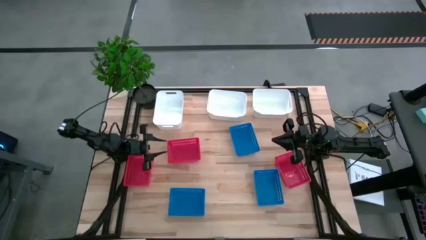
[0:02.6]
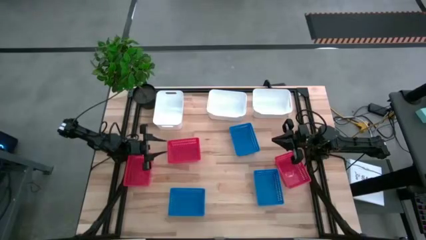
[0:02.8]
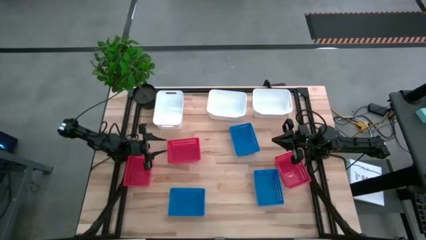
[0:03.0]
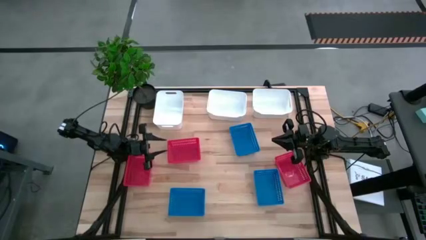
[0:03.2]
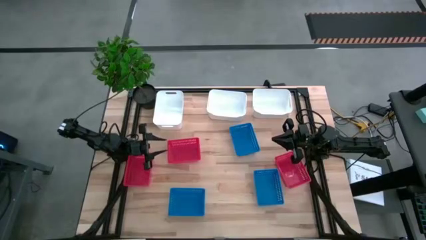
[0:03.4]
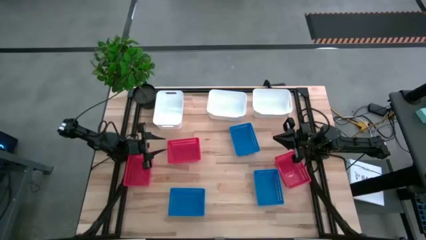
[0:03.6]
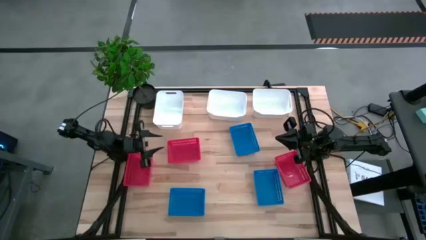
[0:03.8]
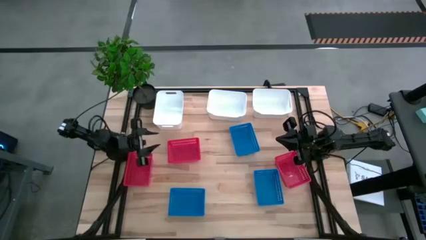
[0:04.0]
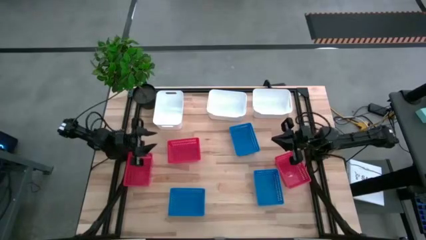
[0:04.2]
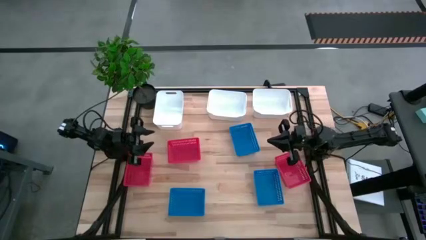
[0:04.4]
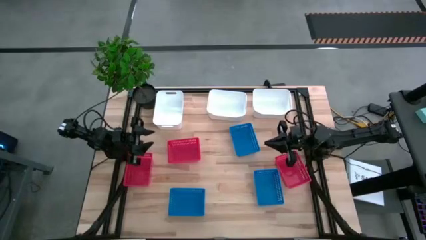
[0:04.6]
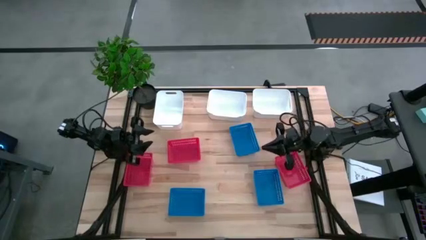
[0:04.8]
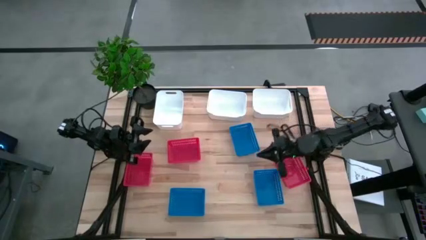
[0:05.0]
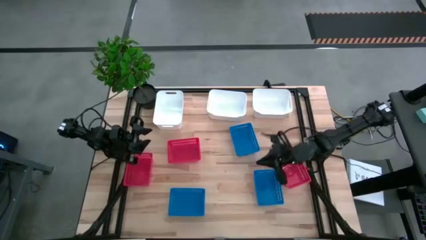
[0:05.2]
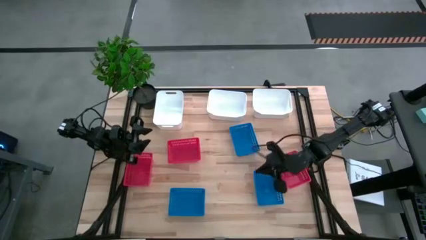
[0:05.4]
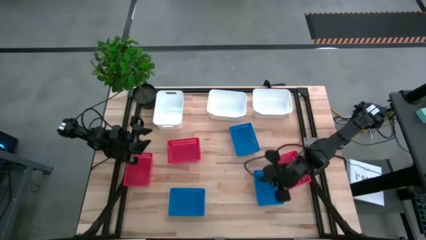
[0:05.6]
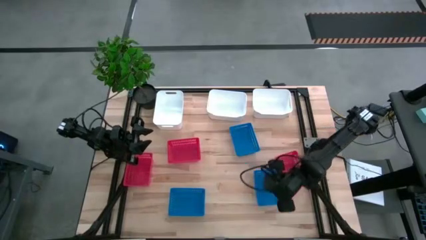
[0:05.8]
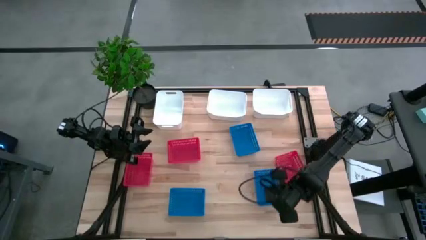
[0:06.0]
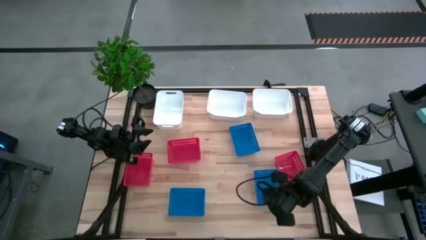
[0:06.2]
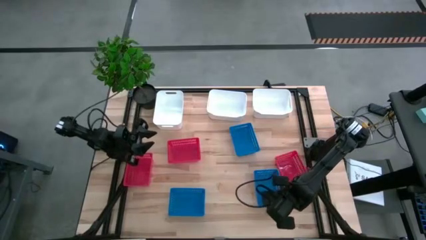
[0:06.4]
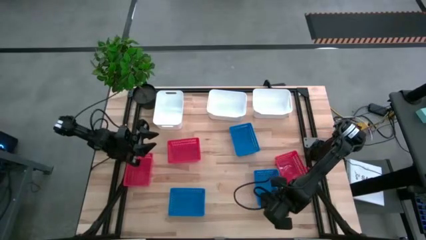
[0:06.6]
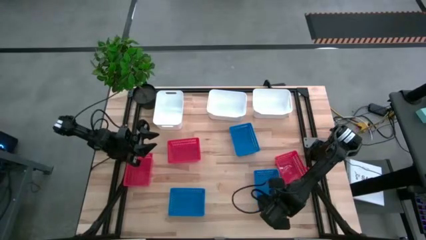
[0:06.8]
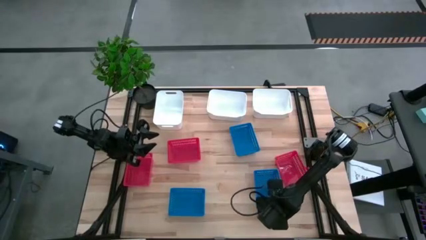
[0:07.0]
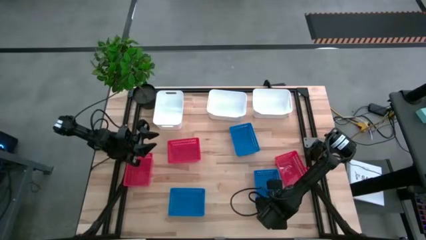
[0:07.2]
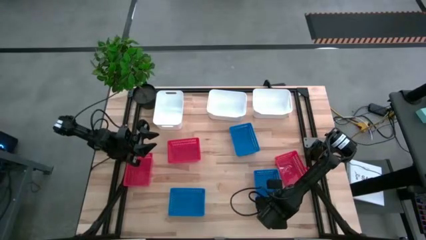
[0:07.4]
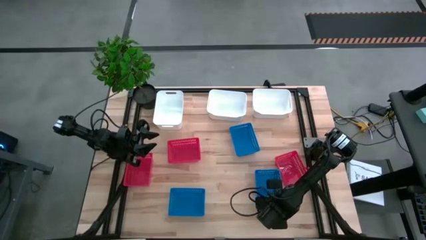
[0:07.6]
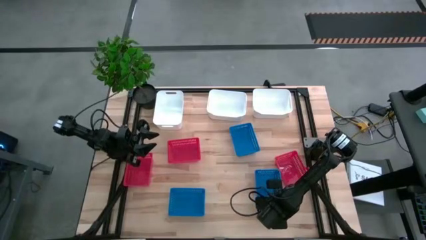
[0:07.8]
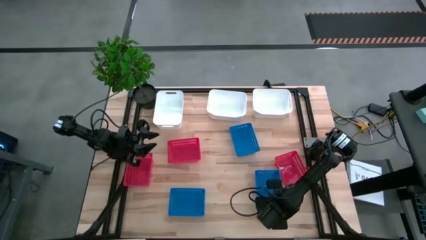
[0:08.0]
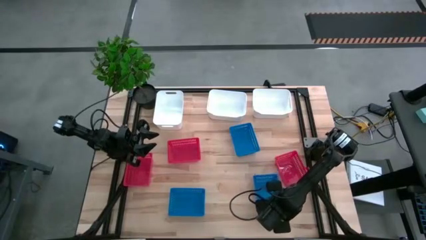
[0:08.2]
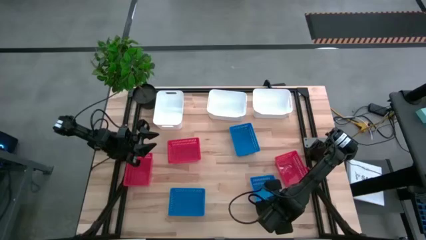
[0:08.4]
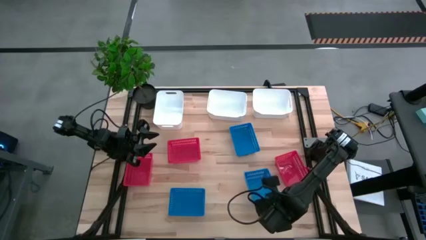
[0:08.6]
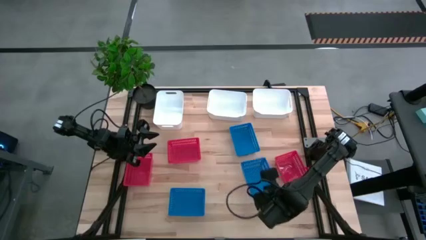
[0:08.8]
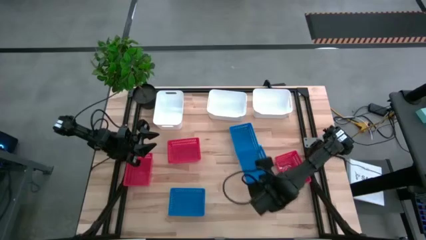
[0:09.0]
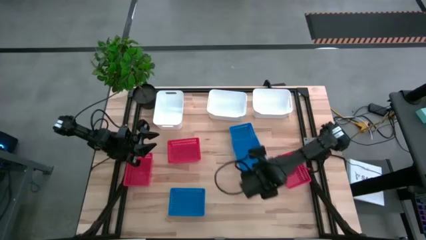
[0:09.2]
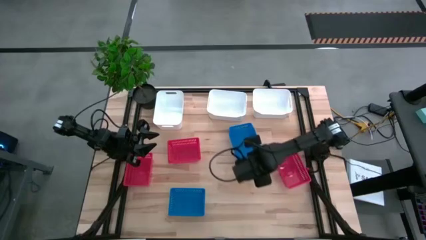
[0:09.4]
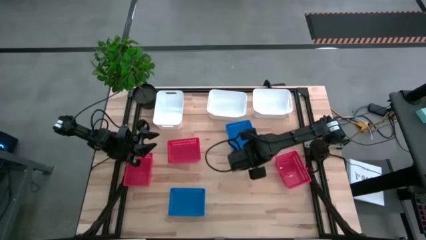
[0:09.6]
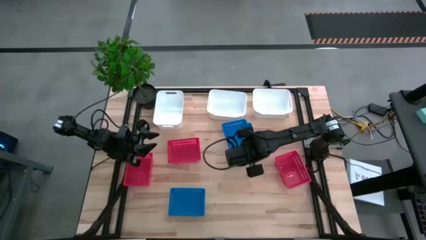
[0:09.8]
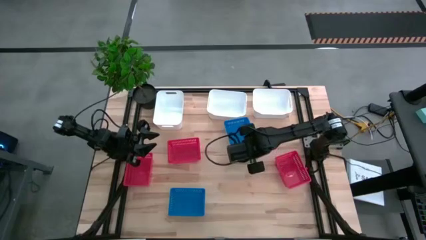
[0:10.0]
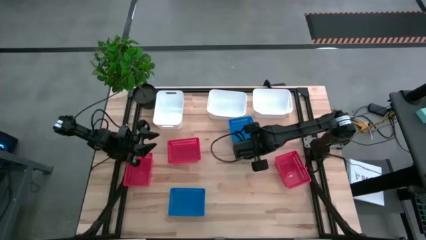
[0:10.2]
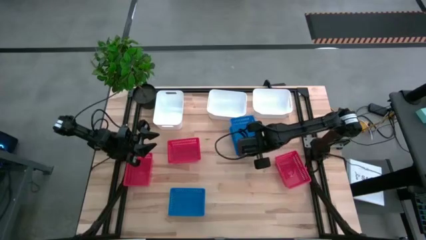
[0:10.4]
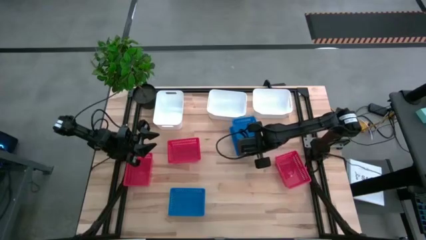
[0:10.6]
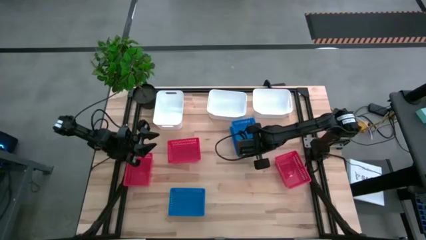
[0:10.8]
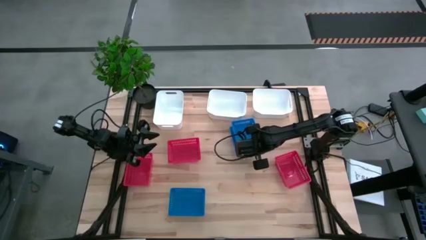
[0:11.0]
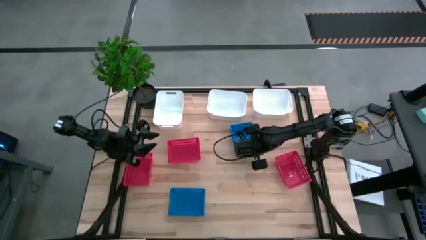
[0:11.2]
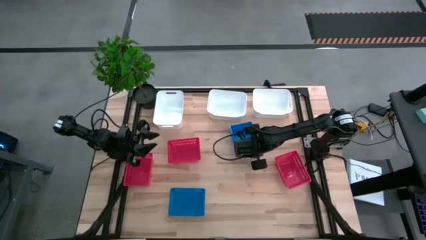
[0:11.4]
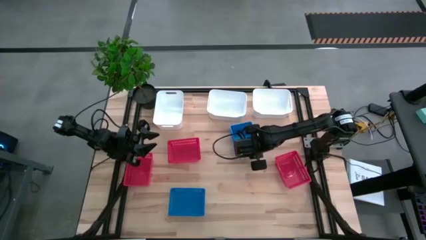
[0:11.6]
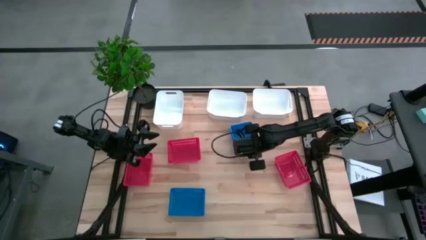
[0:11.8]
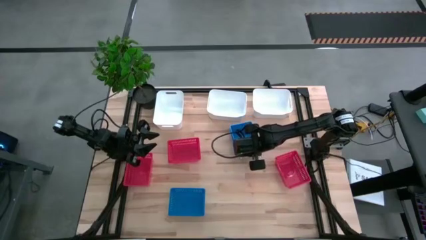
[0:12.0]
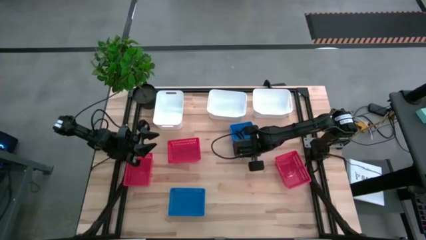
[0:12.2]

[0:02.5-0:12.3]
Stack the bottom right blue bin on the top blue bin
